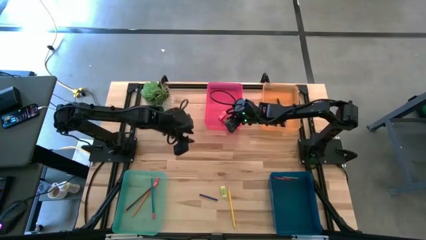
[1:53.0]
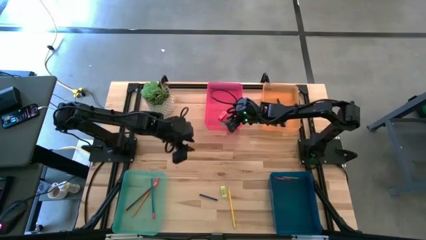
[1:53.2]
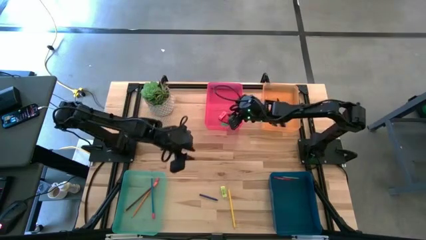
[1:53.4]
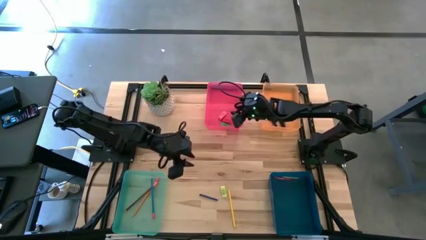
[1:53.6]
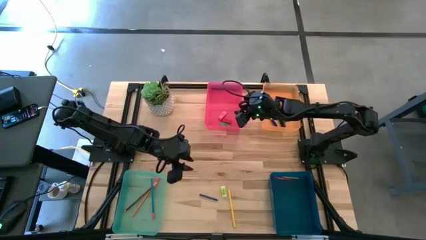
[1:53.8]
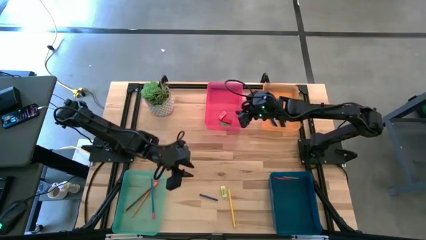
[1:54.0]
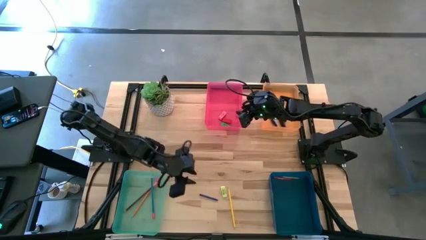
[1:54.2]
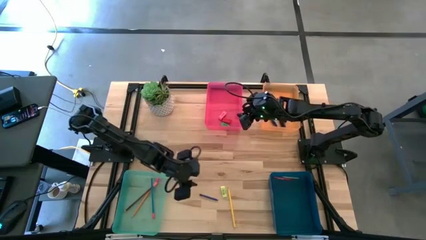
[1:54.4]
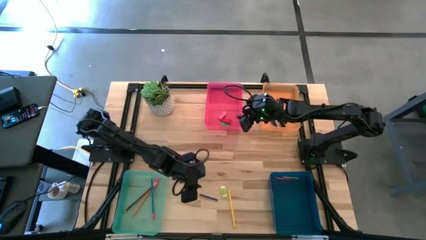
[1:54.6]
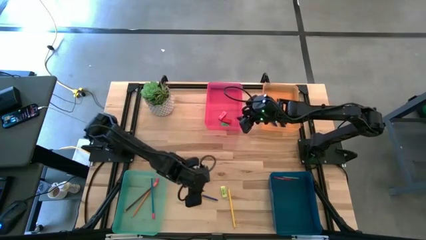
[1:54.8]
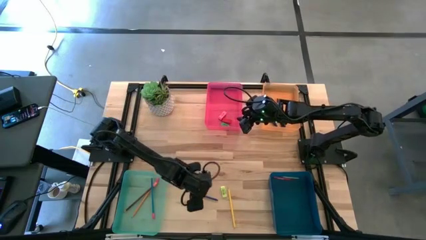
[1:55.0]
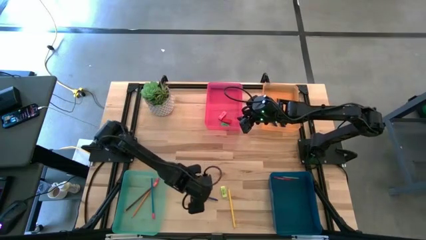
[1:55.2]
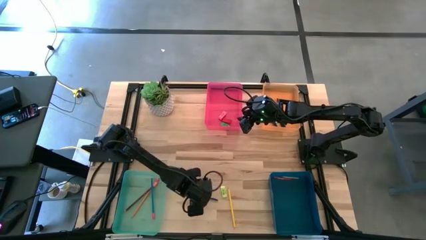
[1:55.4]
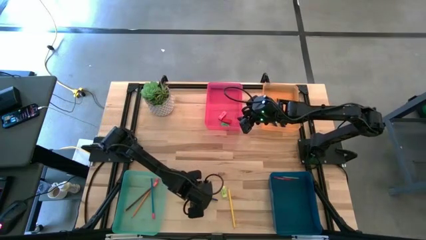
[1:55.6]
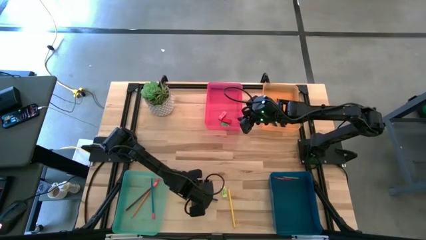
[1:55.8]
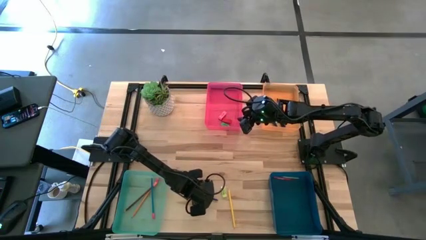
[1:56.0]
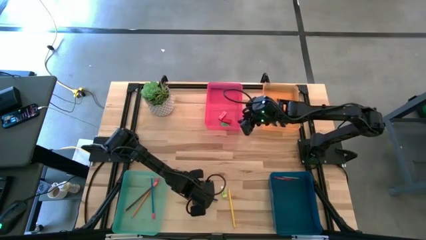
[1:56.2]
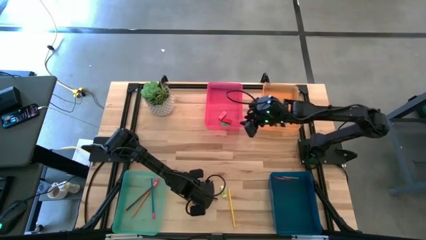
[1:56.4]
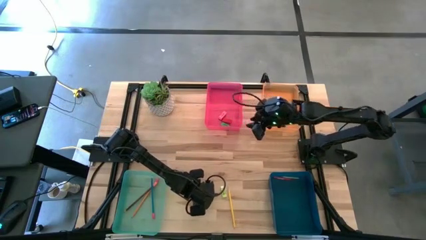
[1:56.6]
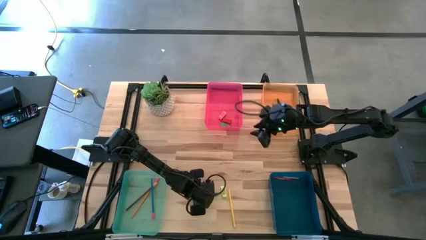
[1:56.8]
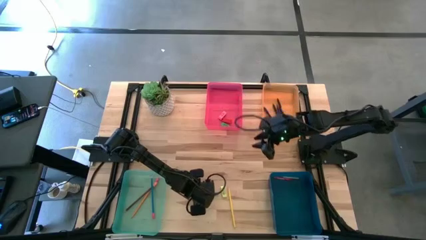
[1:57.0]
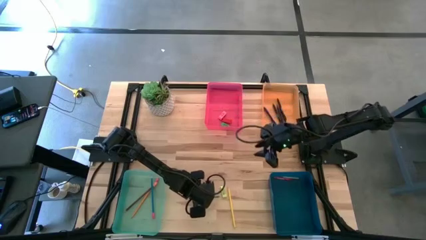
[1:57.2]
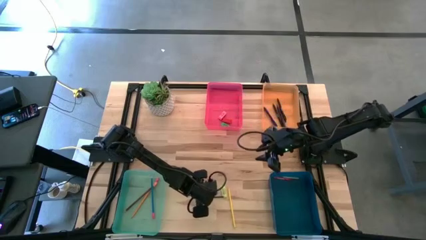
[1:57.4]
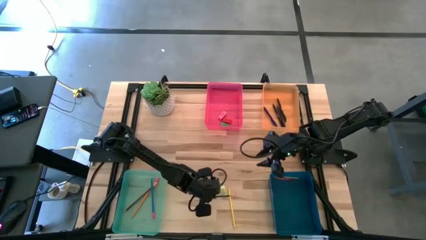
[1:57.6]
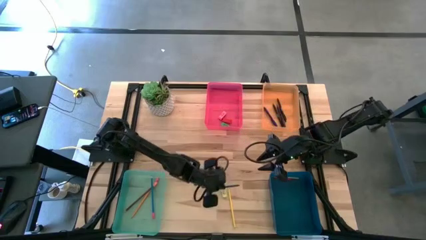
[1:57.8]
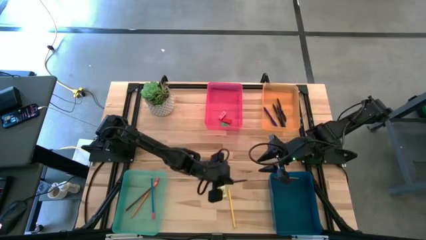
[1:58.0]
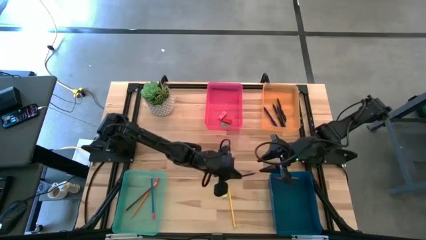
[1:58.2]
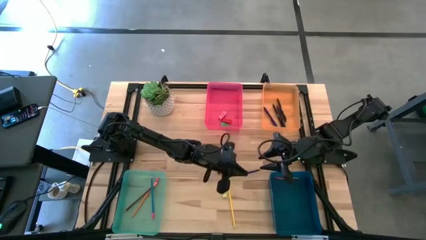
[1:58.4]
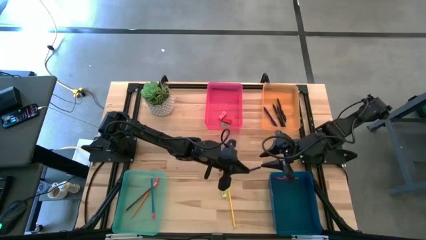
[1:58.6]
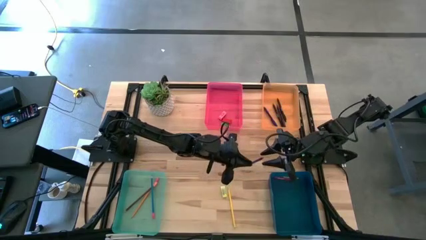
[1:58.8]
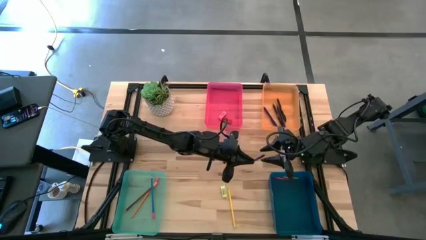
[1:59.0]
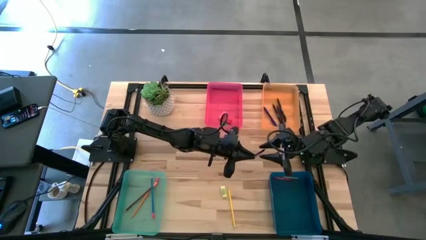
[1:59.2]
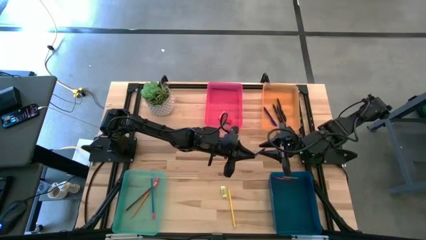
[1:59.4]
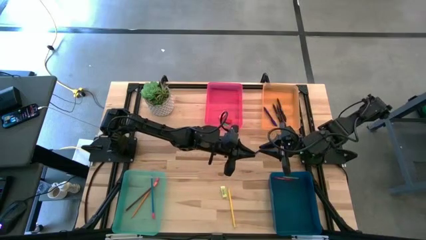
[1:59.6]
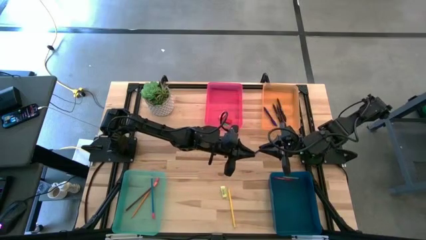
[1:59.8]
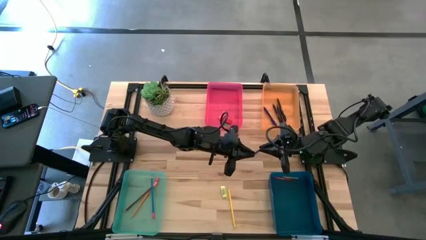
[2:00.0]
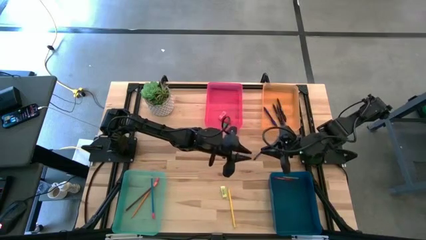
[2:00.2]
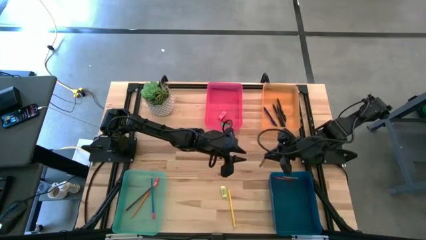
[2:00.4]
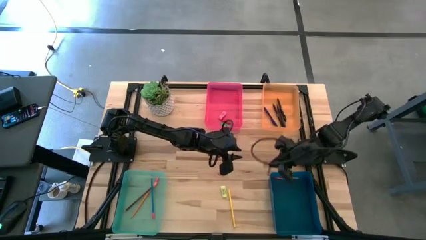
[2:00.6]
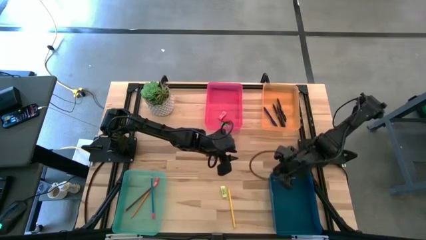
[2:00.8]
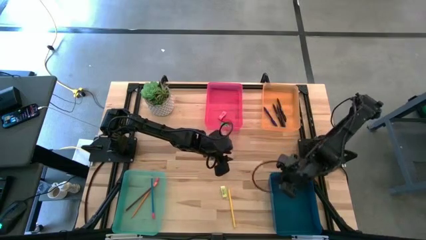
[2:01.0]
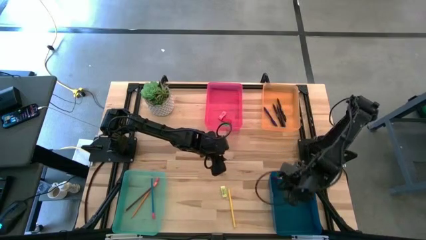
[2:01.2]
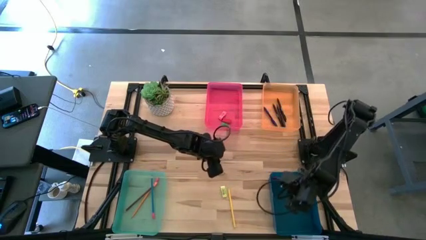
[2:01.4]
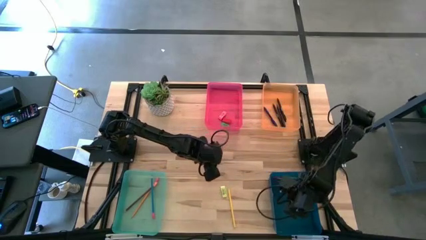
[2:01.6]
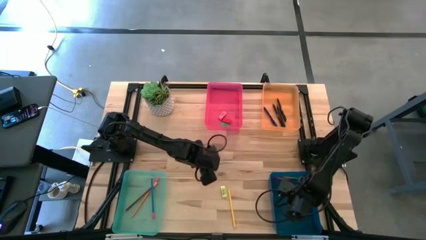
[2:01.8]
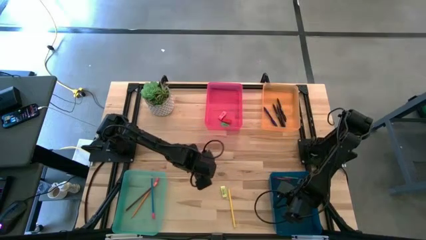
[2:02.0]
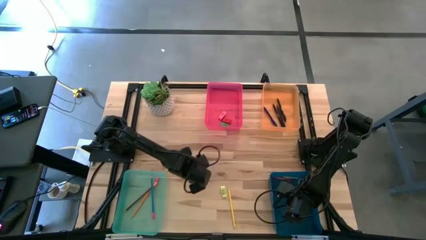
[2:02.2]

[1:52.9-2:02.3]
Task: Sort crayons/erasers/pens/pencils in bins
Put the blue crayon into the blue bin

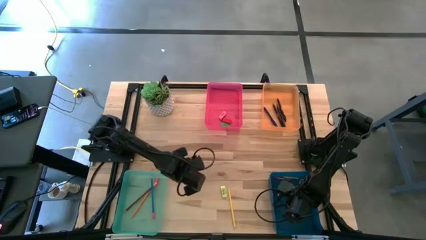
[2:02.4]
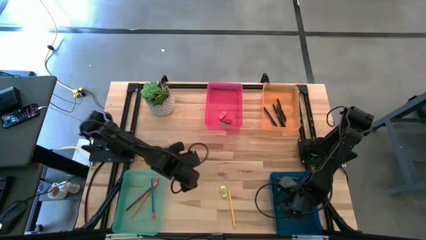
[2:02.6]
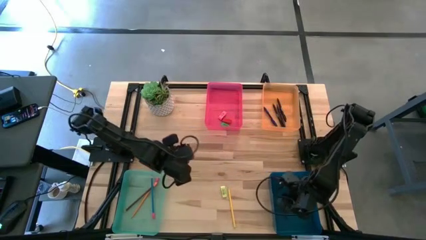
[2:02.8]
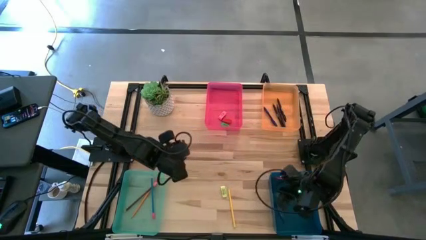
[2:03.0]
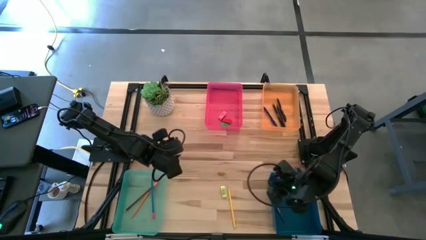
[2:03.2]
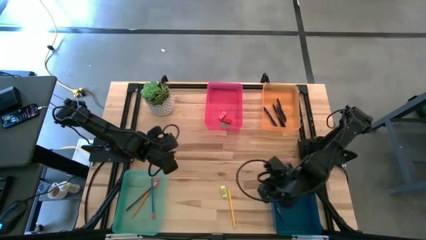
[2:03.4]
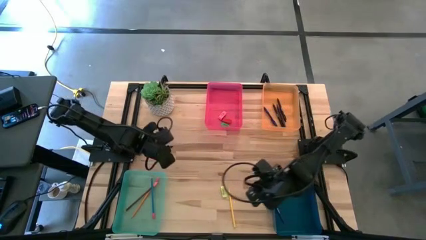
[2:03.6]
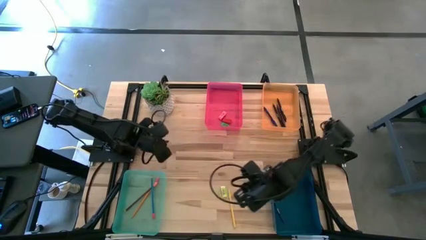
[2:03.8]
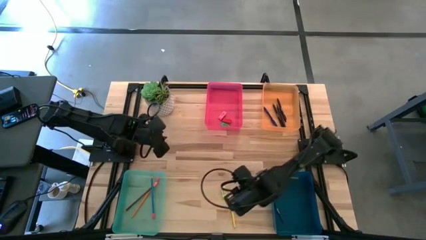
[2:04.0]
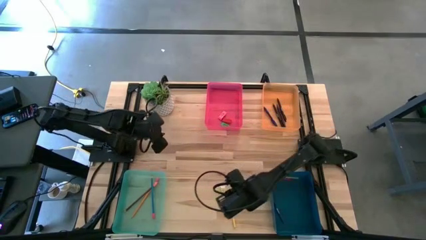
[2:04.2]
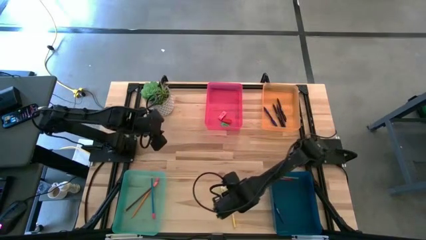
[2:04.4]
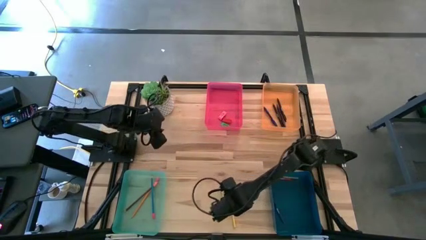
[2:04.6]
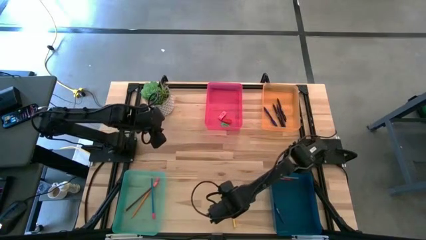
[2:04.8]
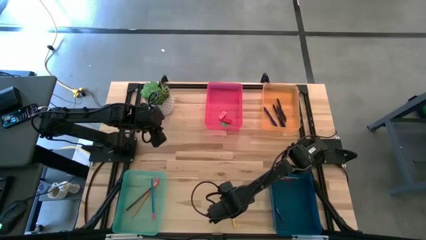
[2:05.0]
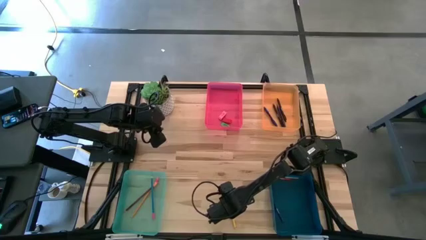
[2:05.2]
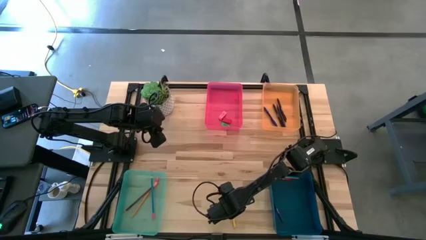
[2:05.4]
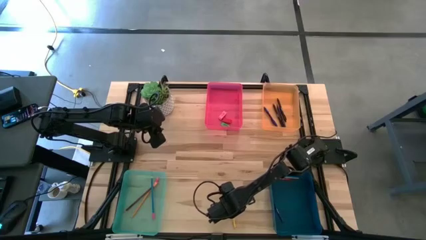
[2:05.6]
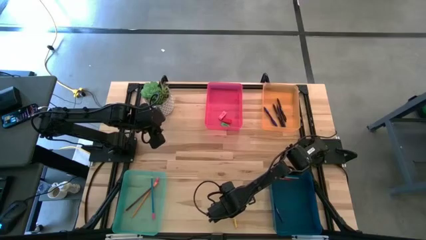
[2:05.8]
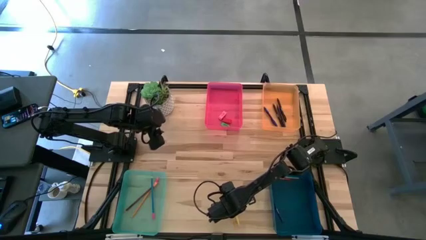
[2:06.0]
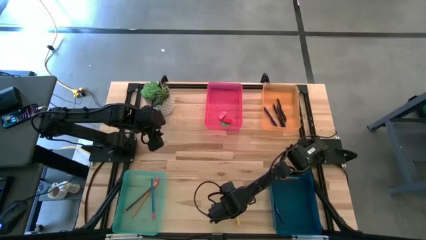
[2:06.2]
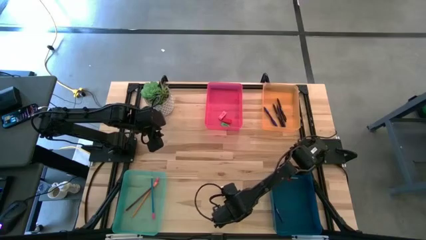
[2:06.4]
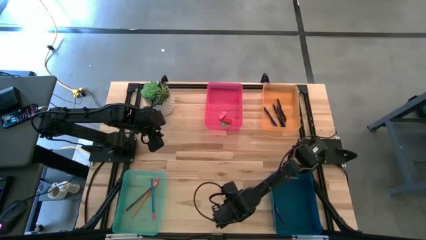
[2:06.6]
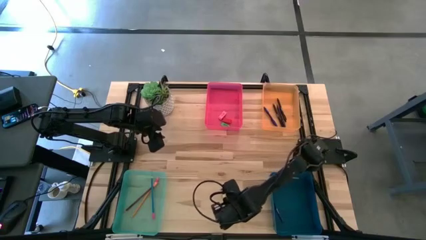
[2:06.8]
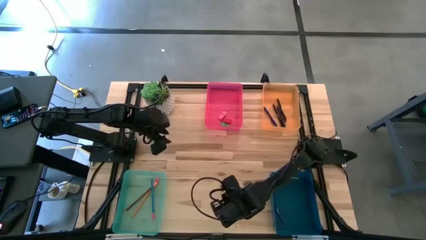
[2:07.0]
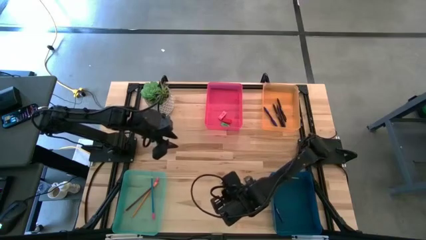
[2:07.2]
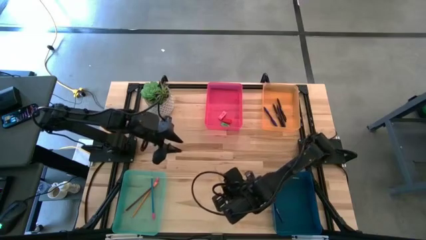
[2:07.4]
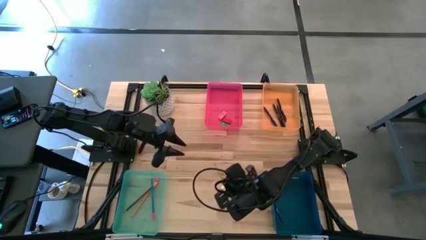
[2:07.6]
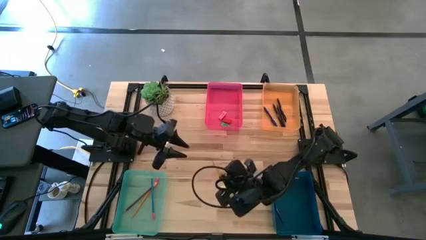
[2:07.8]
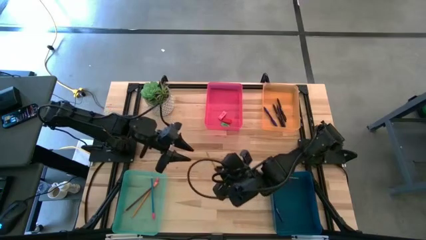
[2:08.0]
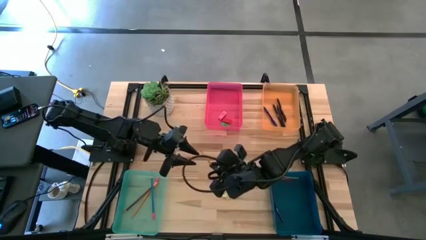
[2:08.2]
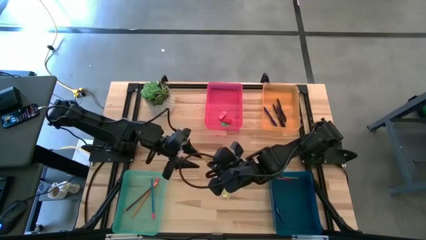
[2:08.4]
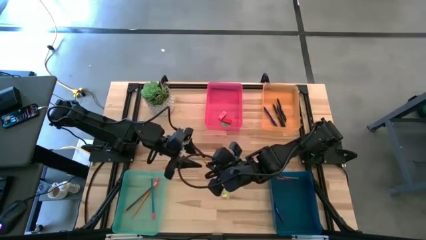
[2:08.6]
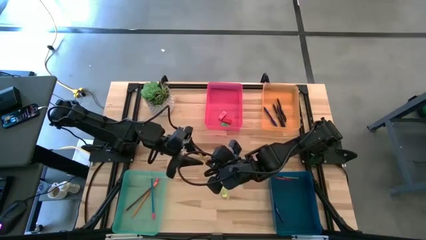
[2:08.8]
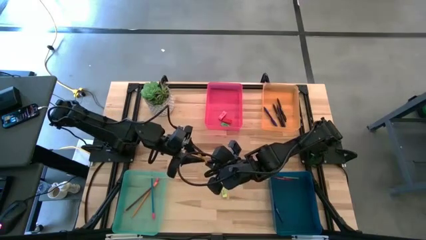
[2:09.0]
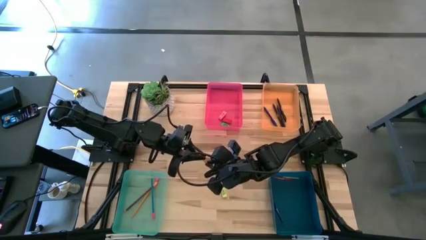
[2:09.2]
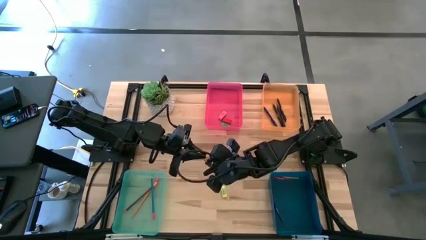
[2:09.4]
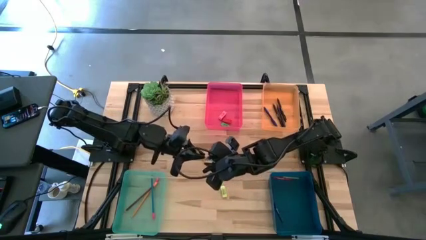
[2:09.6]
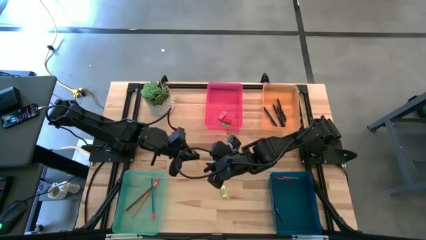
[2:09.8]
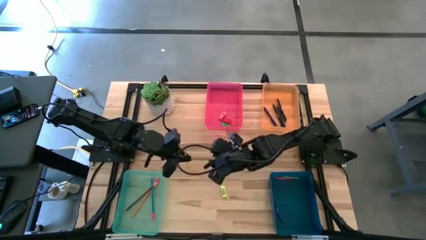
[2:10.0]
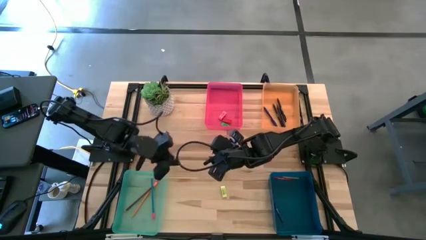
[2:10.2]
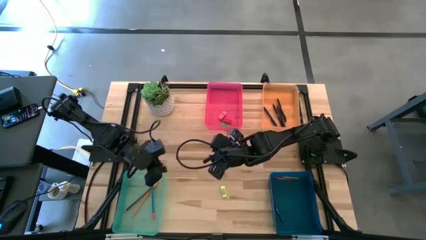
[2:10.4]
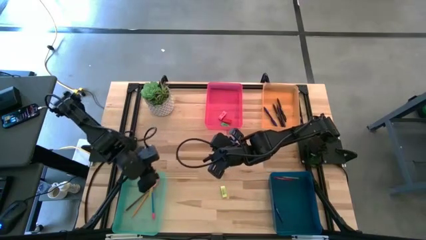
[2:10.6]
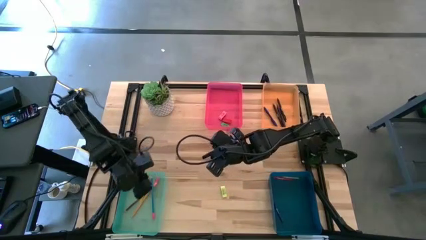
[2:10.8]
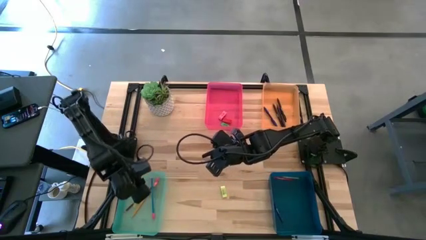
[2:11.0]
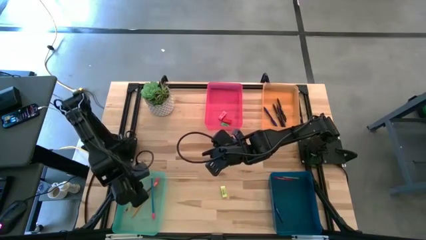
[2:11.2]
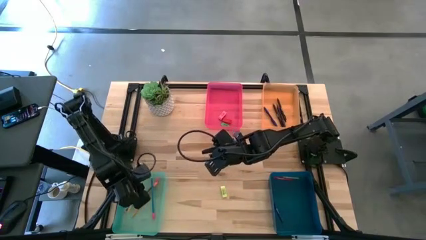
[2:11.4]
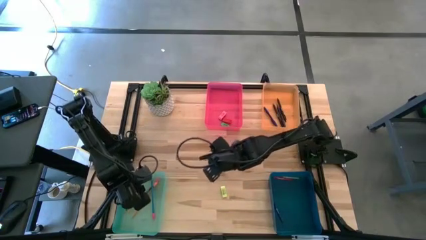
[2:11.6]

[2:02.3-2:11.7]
Put the yellow pencil into the green bin bin
